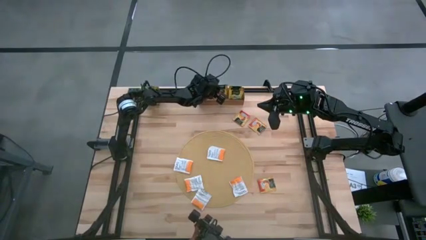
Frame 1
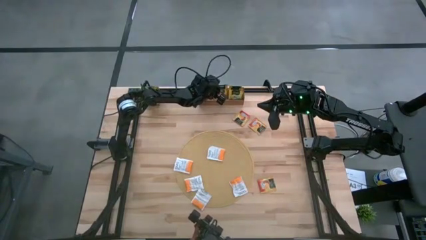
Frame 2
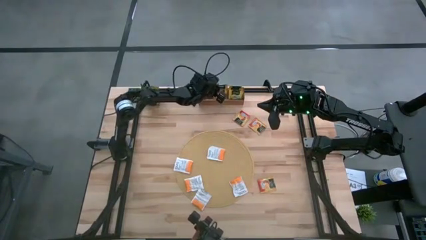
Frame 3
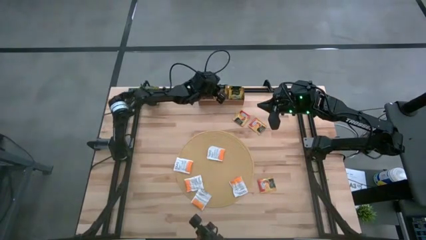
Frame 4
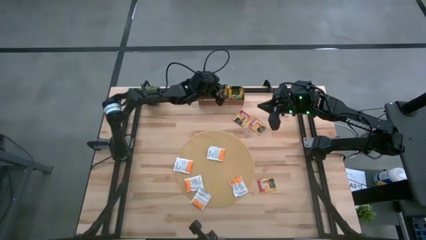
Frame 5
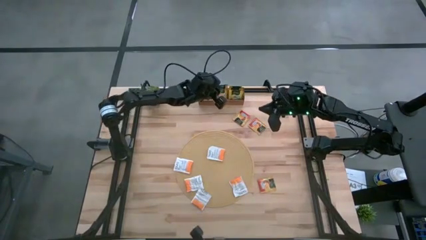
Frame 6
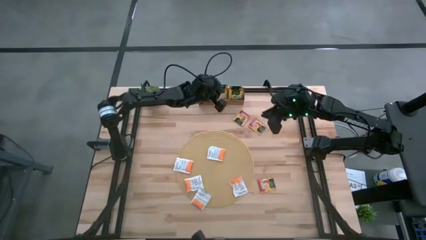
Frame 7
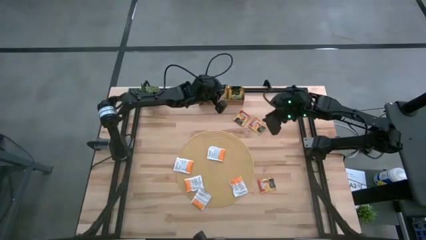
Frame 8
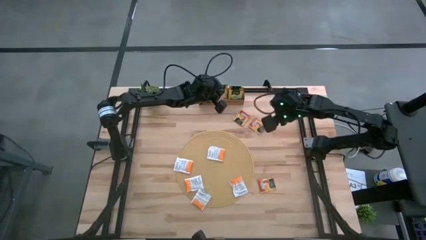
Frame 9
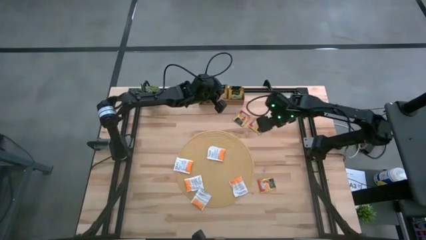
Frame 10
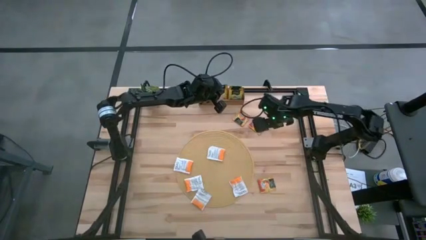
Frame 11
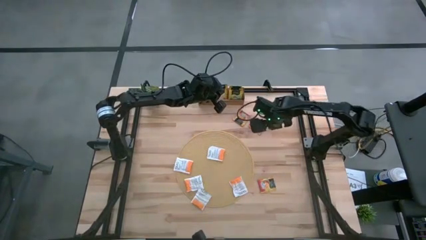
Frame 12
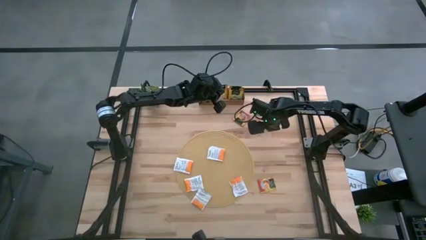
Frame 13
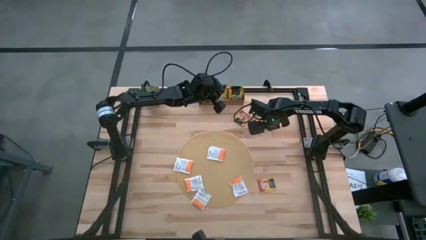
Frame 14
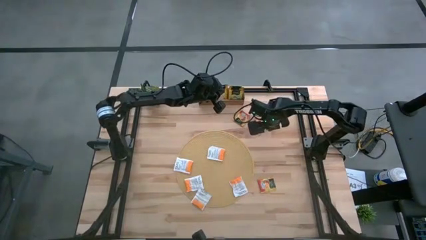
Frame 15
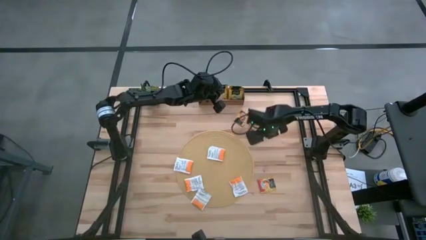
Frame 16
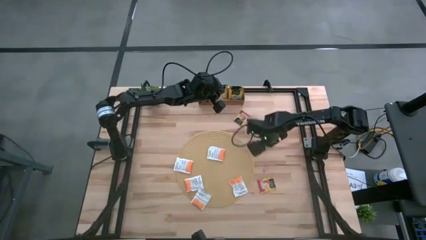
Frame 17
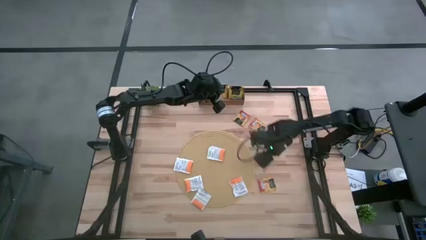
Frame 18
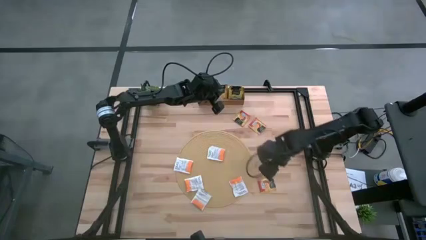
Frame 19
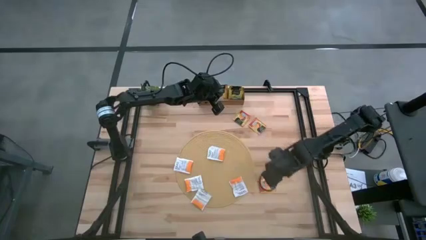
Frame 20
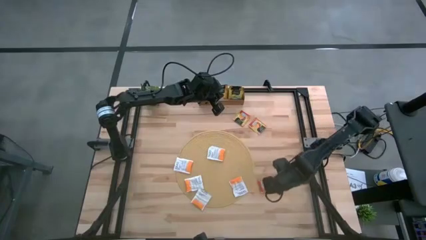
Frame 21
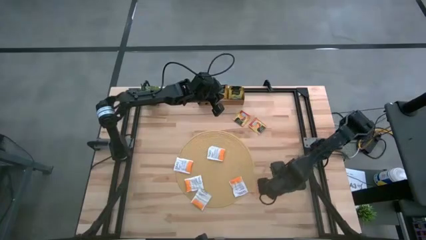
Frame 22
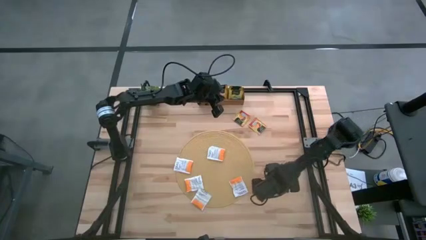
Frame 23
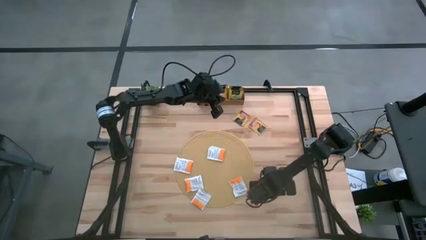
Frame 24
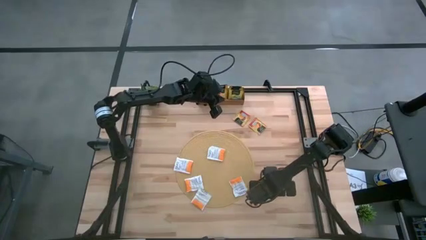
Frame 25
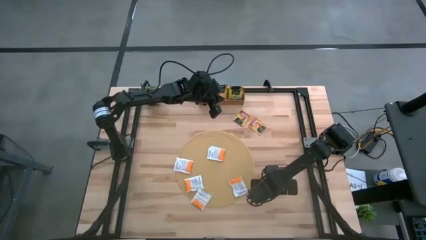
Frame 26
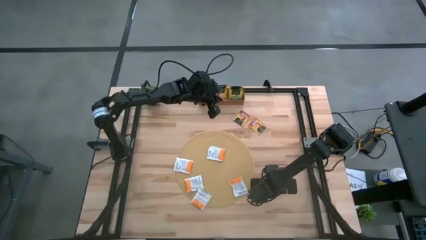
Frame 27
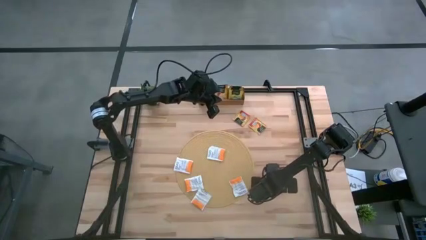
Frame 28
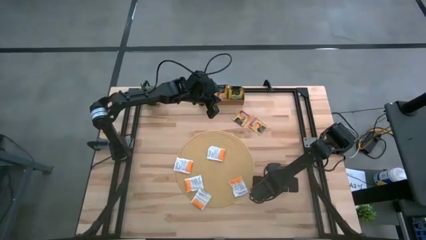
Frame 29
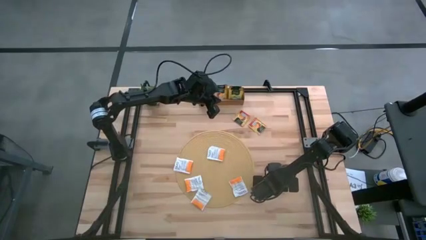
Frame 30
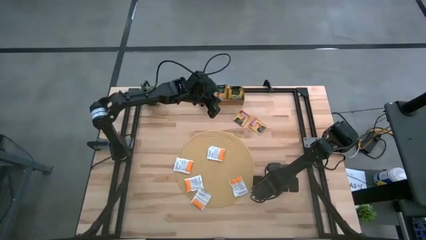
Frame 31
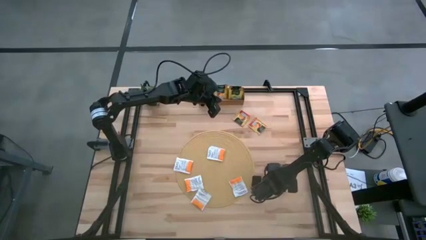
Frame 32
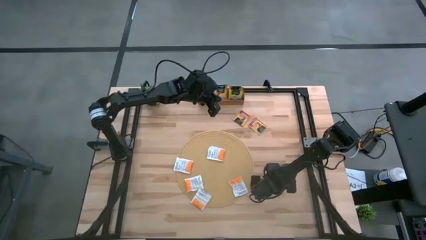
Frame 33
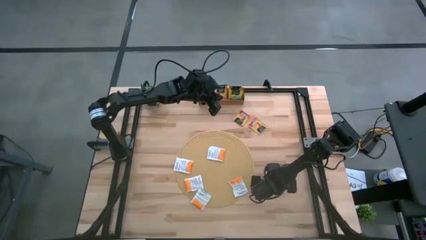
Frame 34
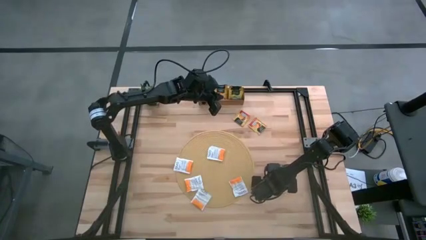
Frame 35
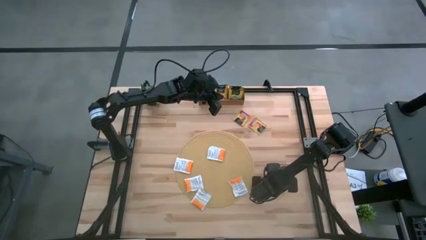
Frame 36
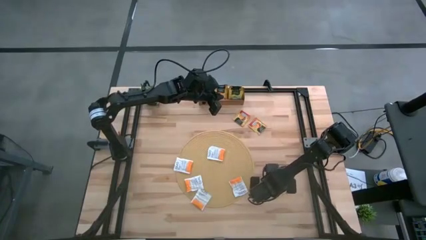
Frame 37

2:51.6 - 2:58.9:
Task: Pick & Place Tea
Put the bottom red tea bag into the middle section of the wooden organizer

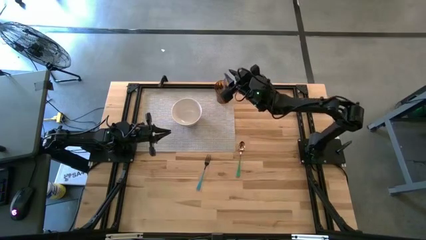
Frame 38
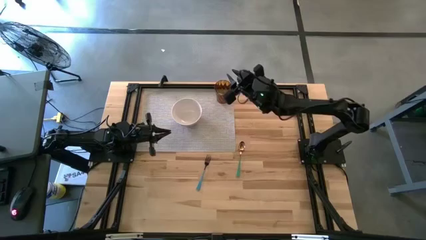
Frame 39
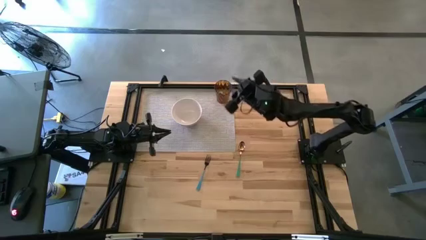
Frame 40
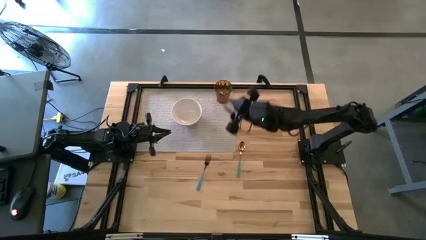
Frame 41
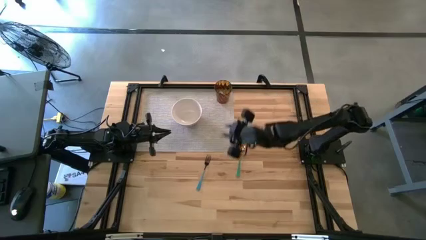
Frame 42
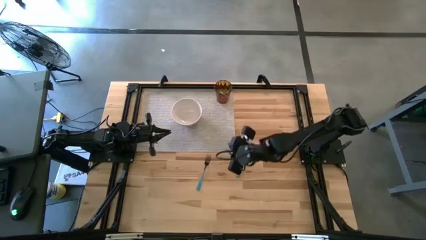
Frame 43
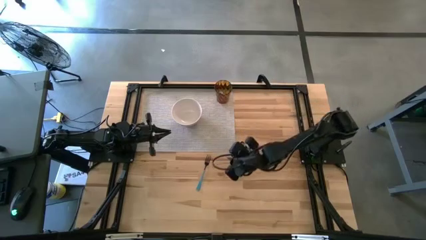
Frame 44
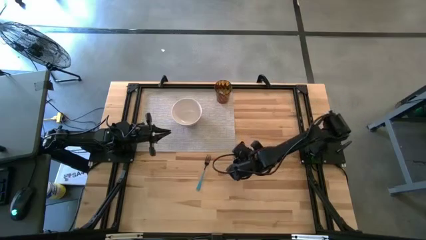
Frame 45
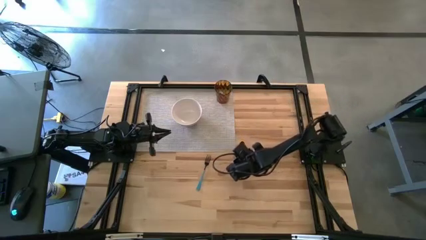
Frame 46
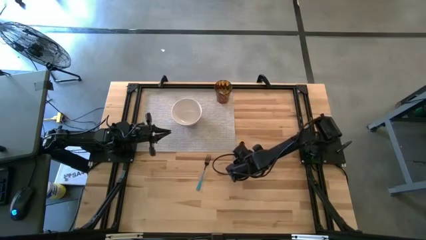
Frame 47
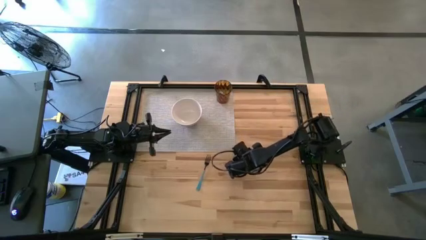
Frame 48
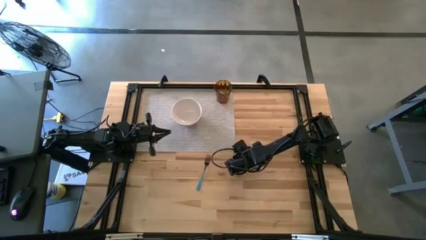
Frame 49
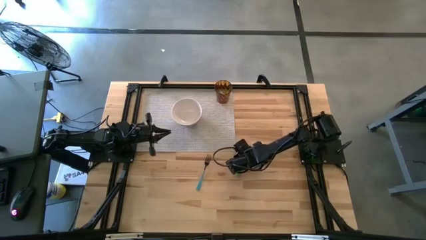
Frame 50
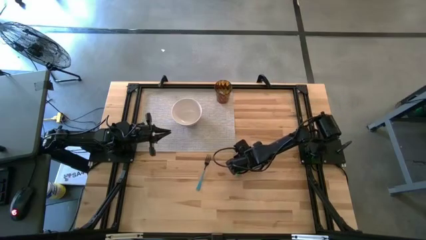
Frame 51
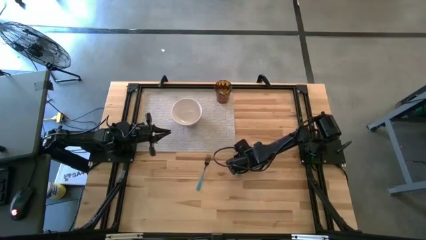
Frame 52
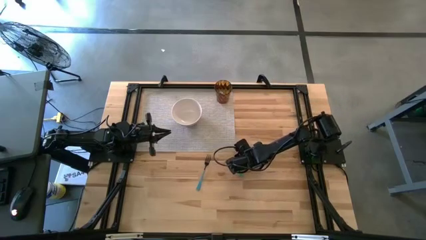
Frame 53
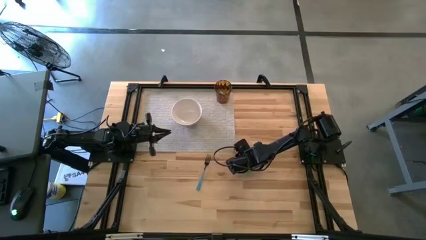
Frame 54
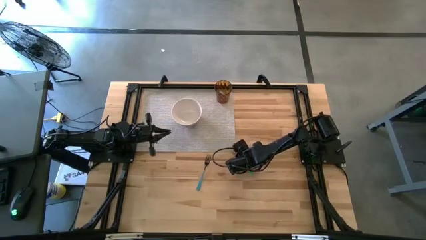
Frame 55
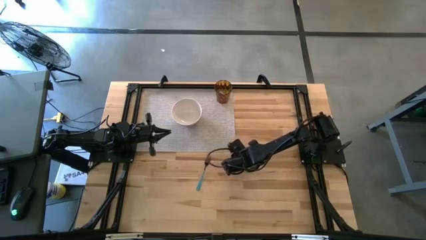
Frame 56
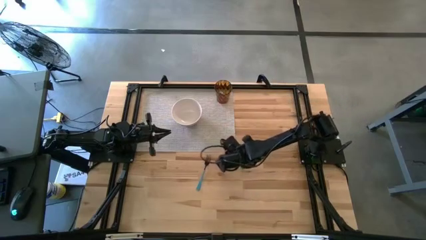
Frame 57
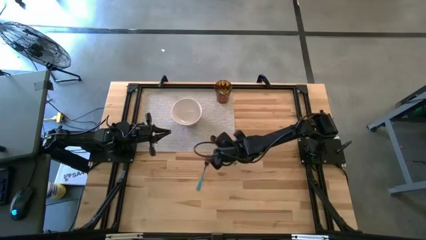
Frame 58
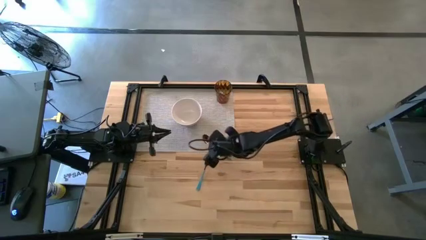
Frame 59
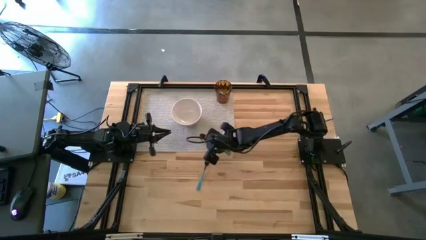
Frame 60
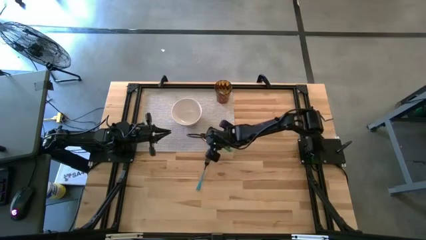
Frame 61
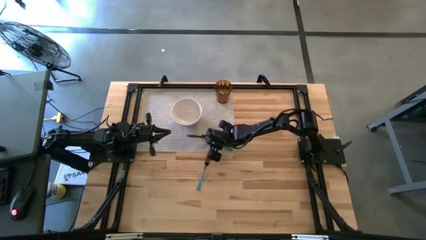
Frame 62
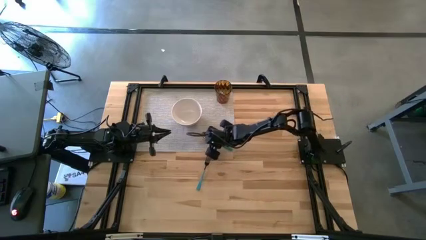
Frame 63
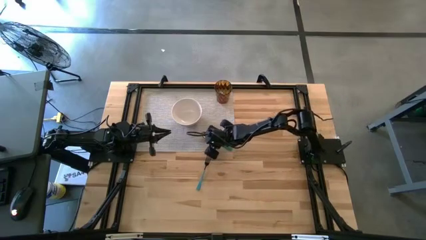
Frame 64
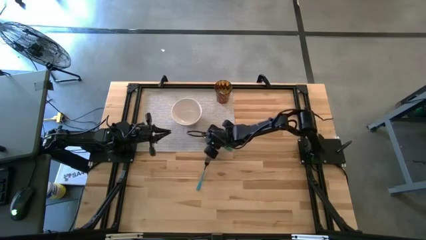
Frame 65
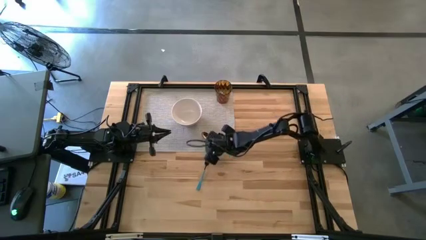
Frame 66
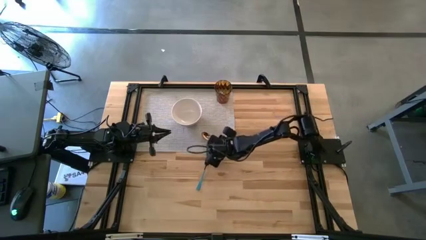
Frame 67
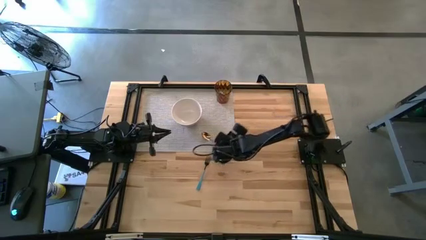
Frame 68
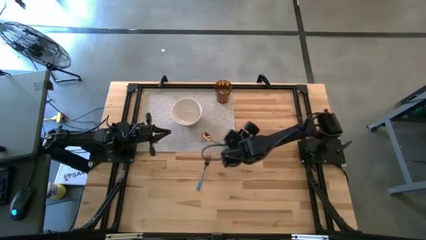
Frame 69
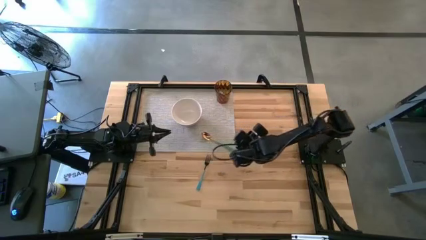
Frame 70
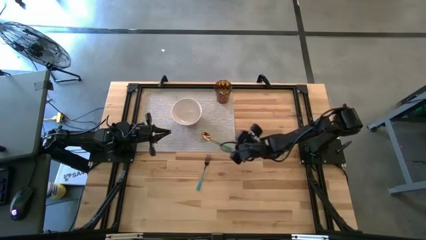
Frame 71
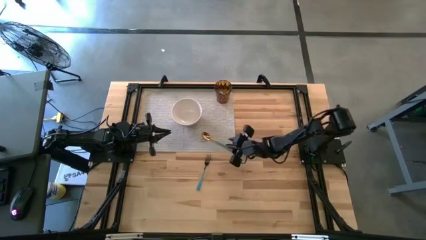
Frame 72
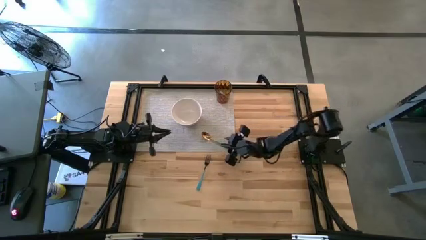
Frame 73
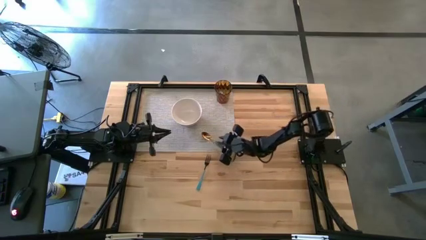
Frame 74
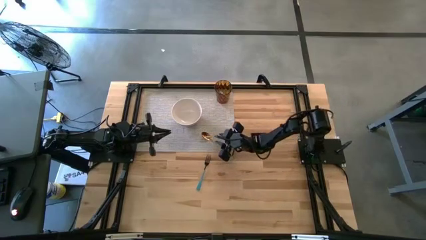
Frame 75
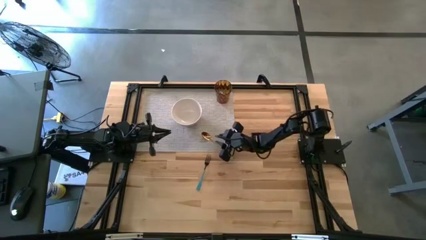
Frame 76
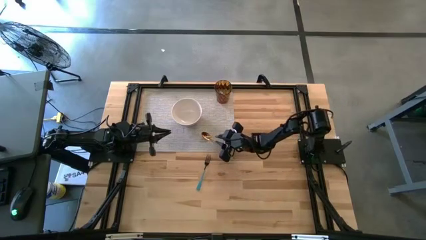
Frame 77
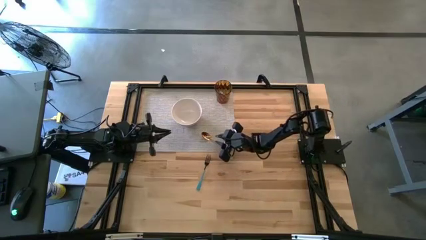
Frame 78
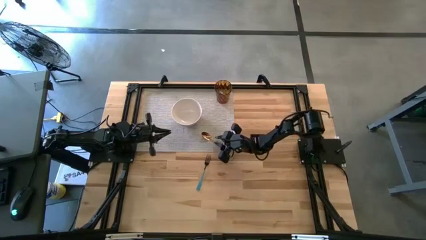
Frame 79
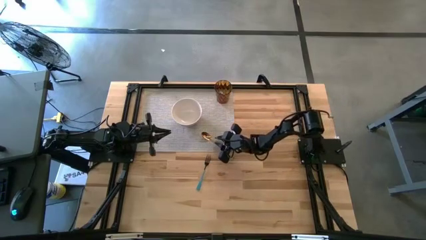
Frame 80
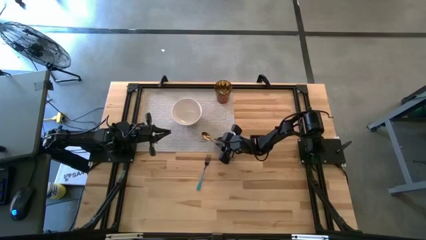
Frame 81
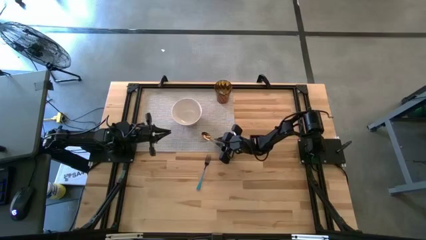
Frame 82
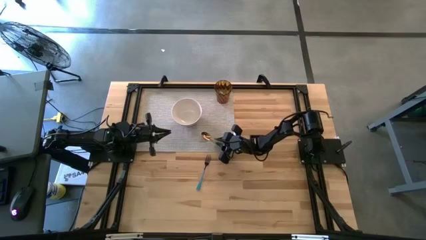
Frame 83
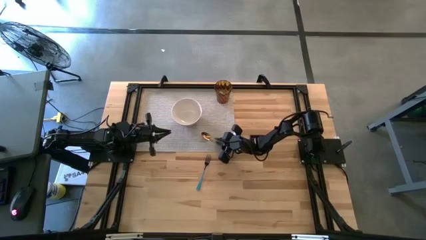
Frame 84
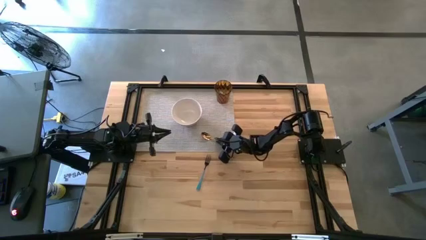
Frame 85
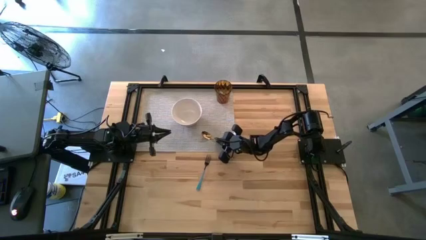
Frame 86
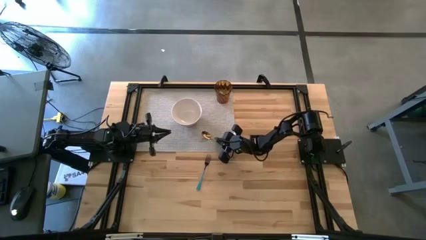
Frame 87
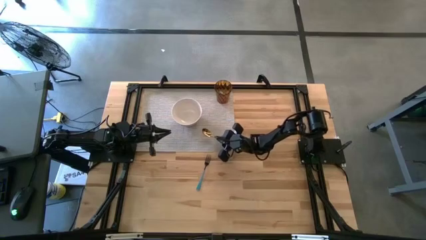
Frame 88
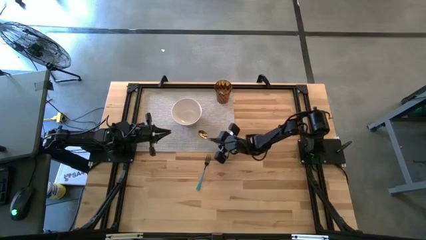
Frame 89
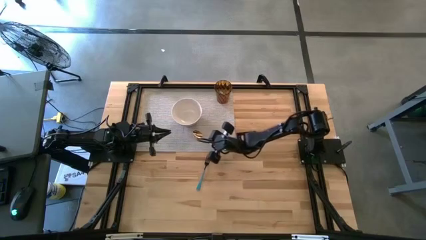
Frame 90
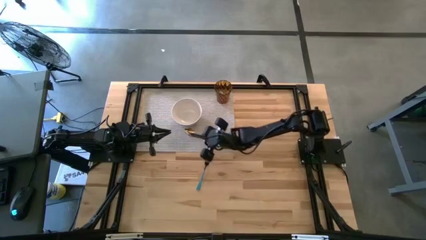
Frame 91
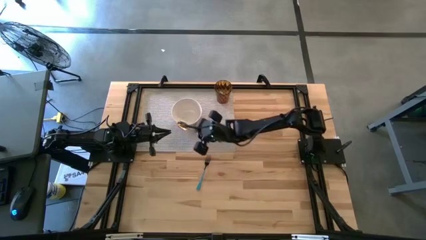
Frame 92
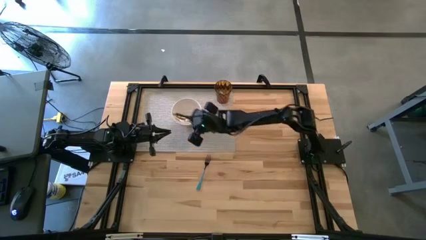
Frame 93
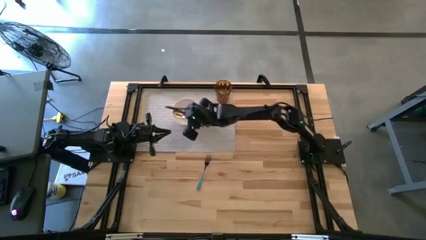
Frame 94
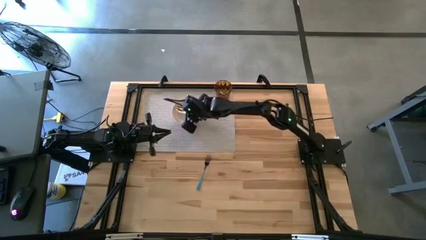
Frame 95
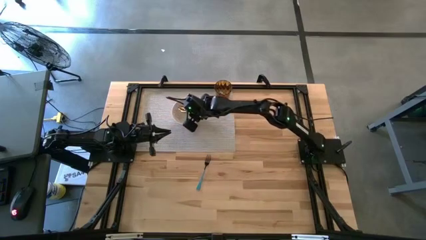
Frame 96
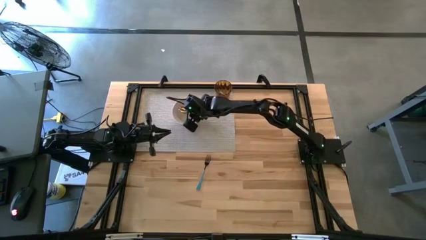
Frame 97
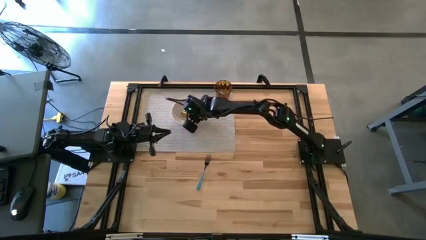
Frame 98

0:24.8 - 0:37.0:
Task: Pick & Place Utensil
Put the green spoon into the white bowl on the gray mat
